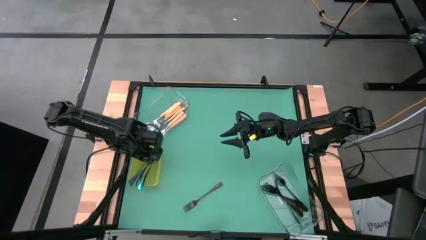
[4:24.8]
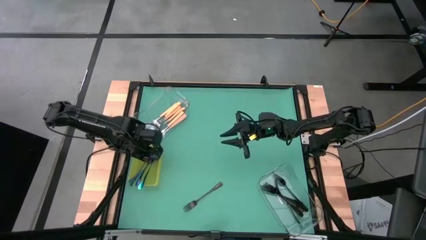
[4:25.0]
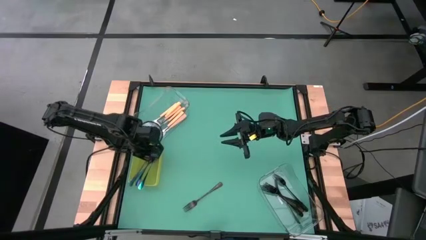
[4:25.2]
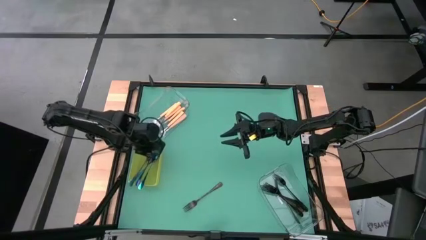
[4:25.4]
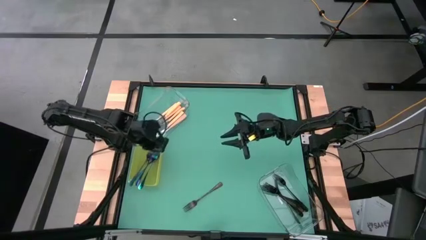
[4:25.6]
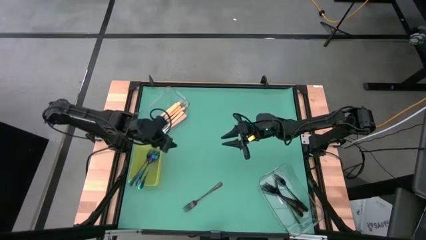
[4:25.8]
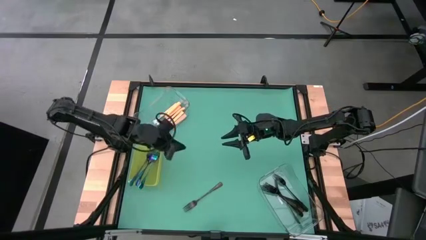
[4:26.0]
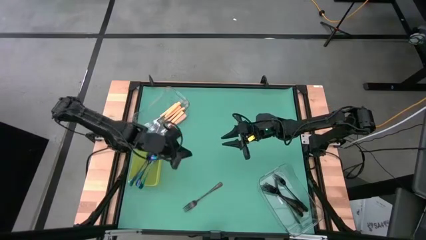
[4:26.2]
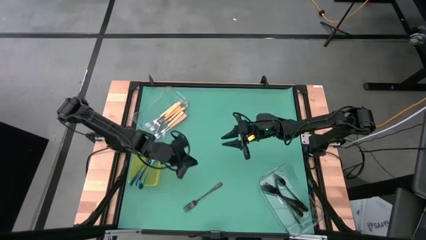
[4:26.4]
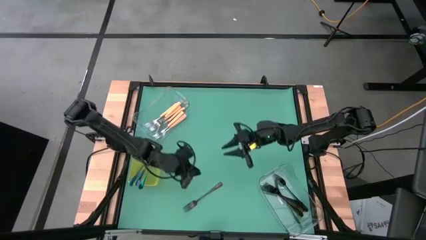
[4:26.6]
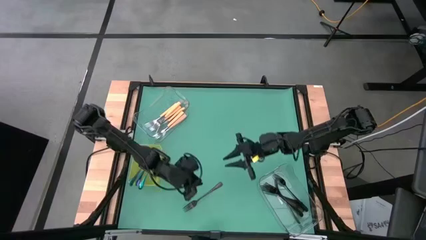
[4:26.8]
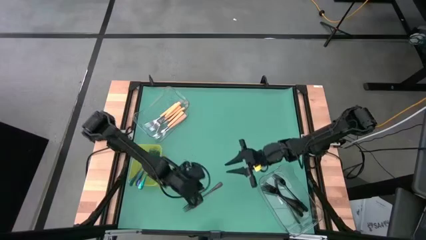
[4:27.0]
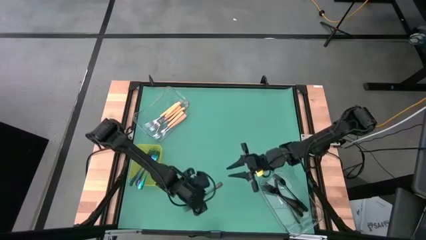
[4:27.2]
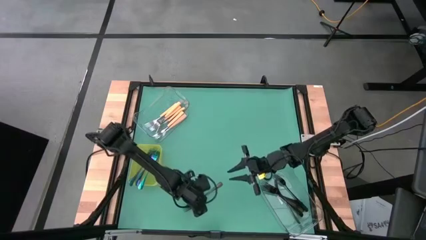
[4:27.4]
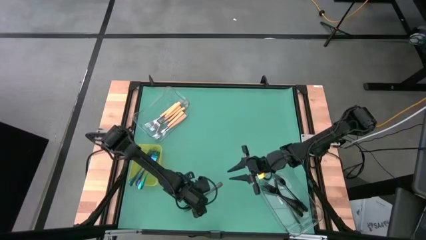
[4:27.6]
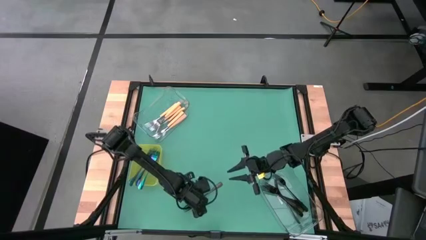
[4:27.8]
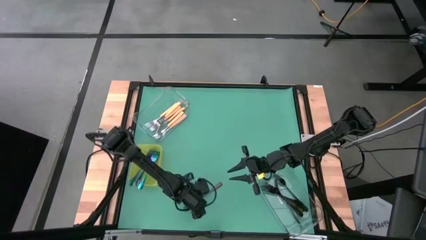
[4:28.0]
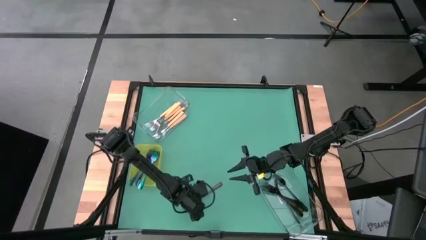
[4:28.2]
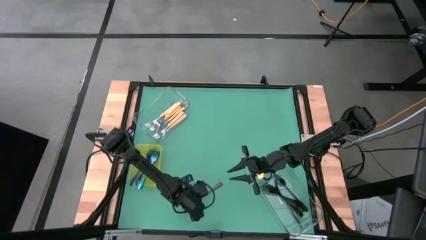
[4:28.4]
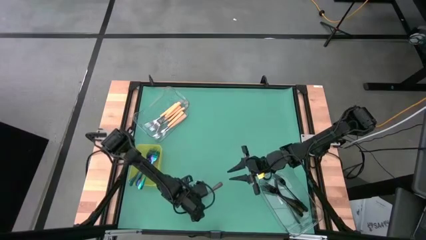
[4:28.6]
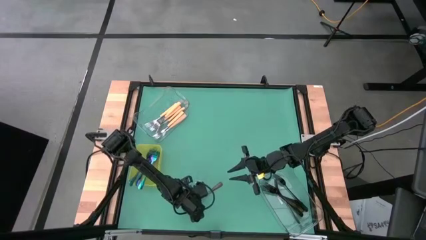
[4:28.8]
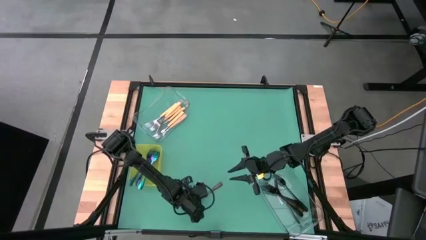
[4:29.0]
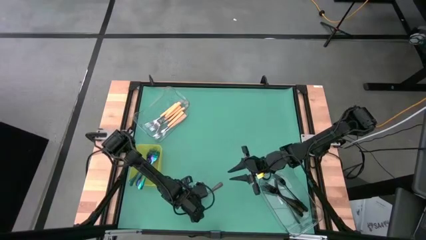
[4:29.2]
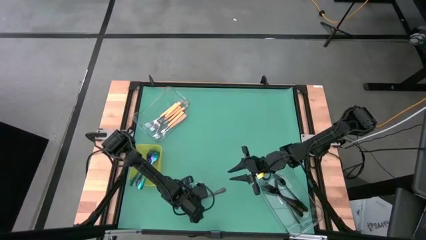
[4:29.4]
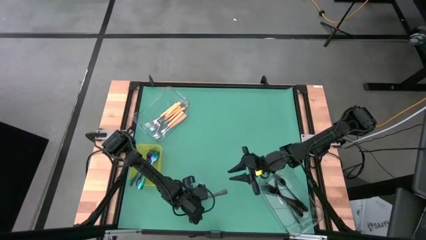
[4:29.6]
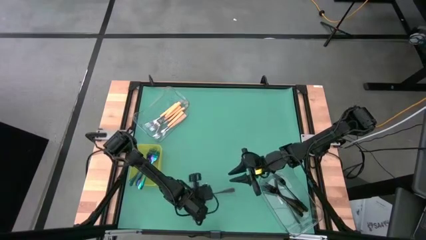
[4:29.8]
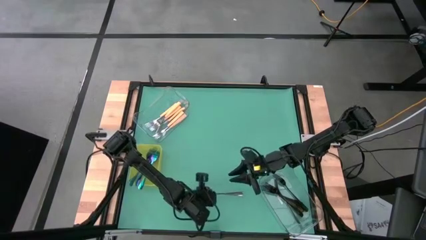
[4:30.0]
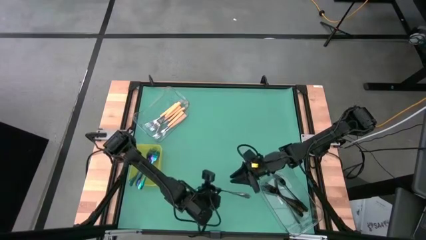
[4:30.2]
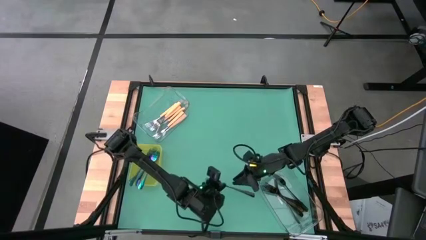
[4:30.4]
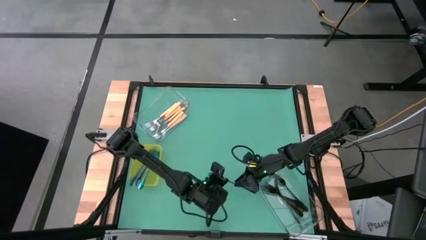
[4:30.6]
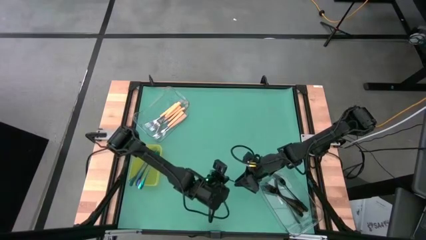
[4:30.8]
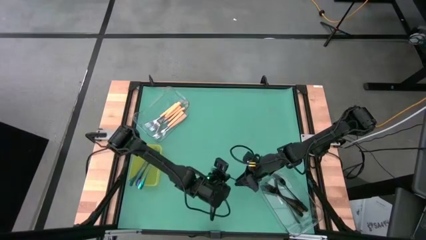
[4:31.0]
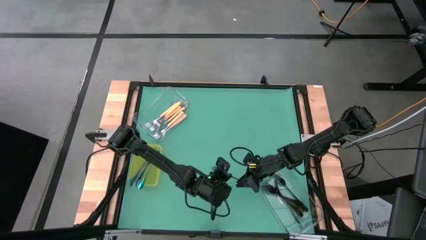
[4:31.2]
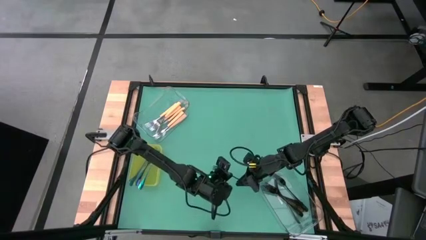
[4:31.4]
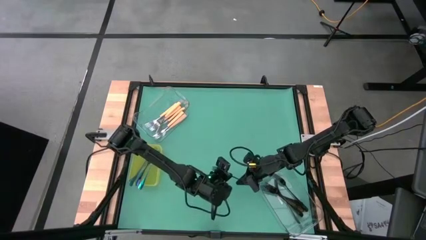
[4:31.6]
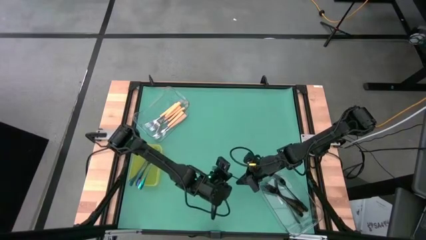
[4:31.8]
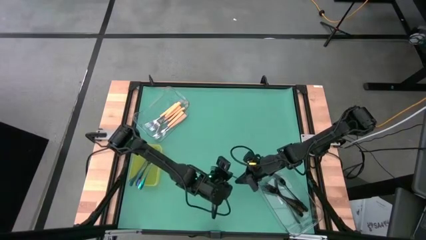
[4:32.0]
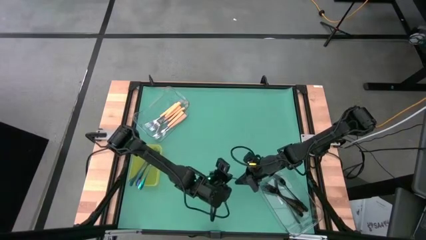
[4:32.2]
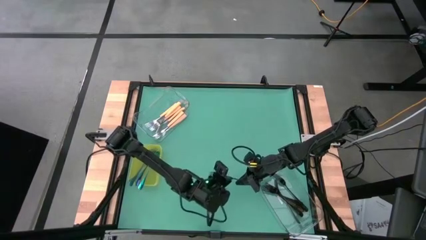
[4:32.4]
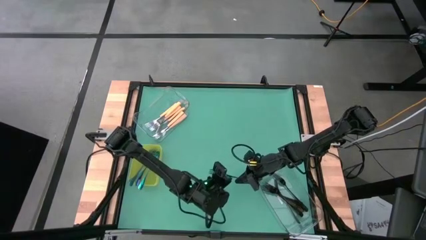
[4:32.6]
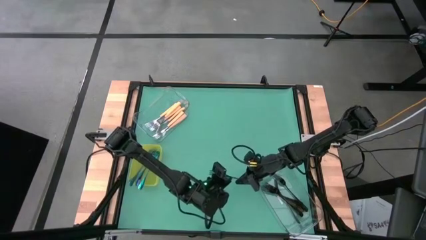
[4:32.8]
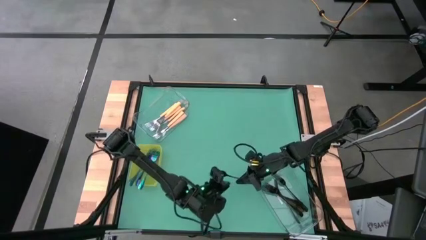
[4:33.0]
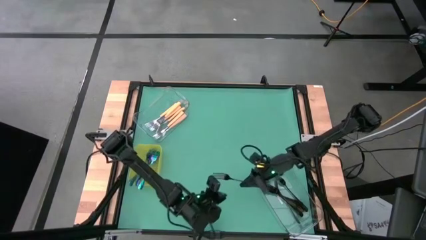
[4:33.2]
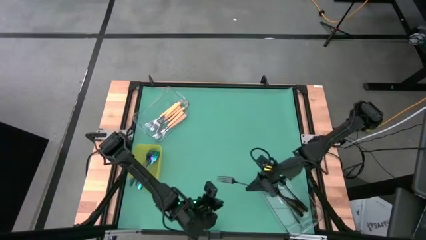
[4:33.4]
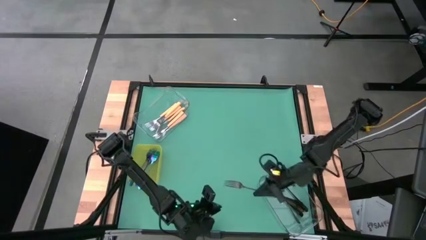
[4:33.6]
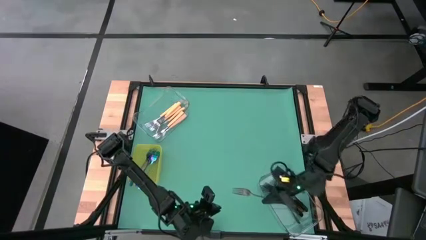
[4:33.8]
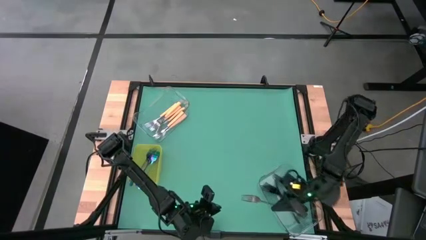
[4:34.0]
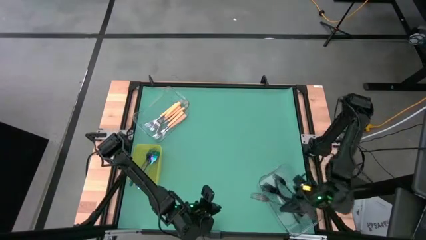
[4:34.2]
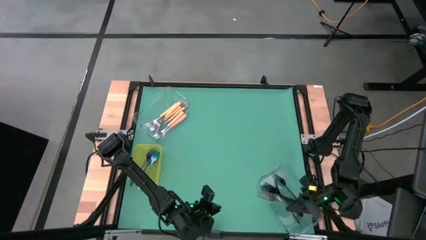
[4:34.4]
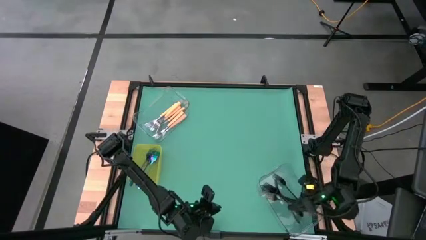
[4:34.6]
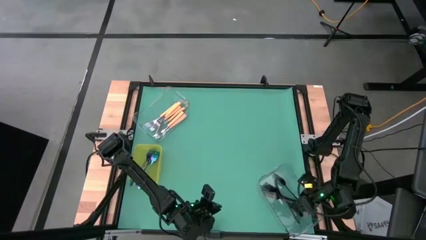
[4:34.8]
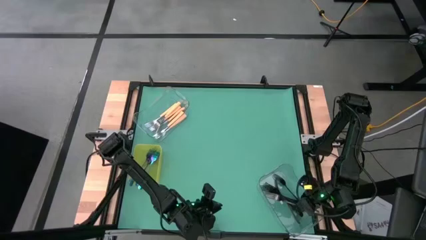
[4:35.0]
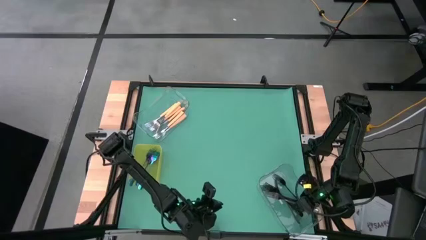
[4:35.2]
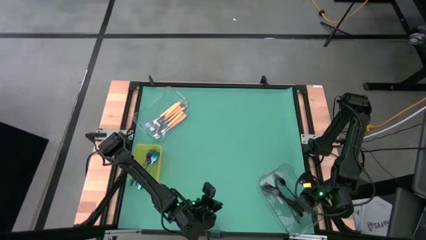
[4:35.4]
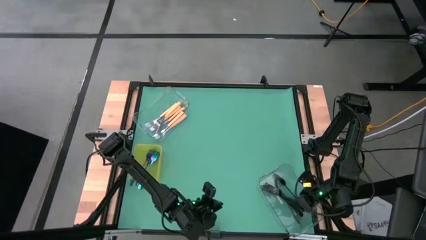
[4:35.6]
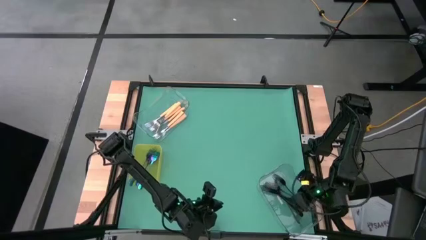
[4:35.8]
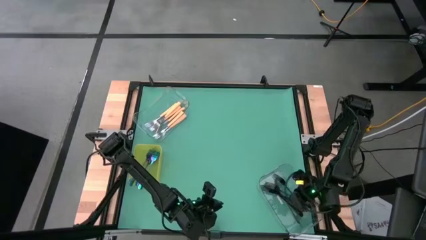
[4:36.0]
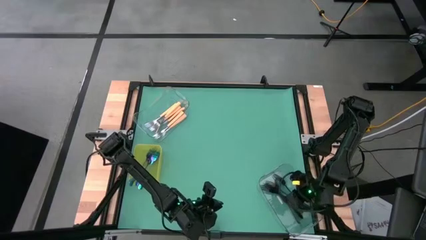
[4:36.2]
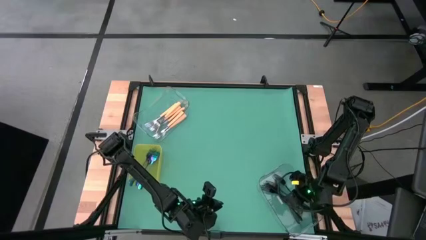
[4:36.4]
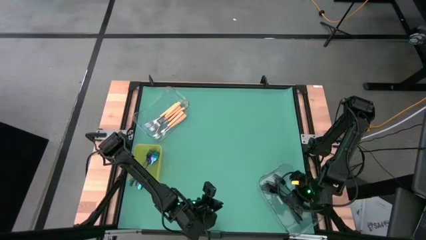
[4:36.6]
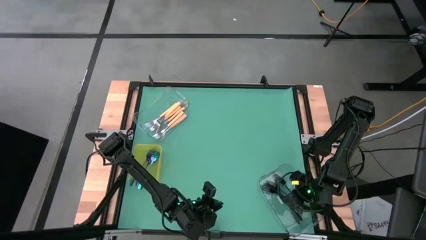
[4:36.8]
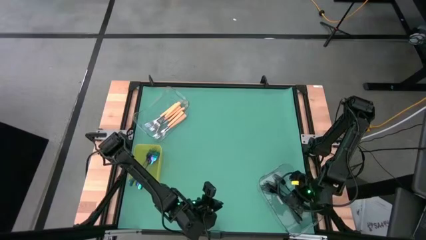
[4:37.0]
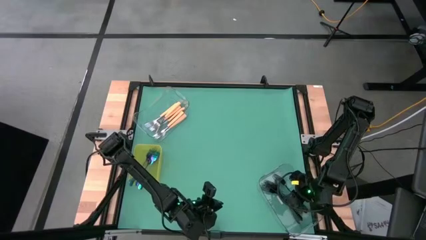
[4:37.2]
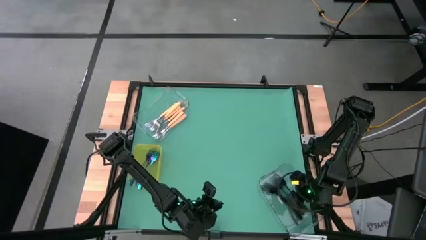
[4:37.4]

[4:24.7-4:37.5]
Task: Sort silverware by color (type)
Put the black fork in the bottom transparent bin

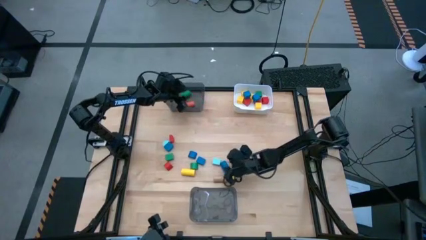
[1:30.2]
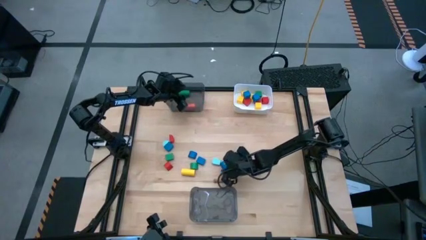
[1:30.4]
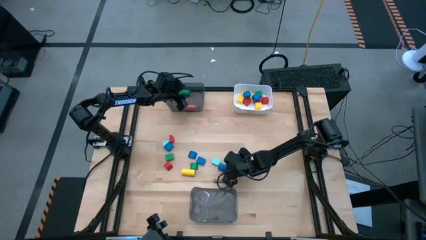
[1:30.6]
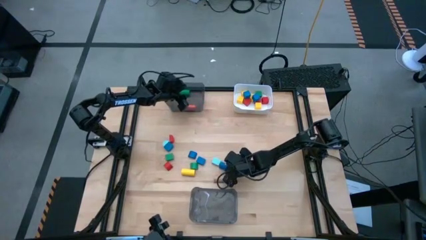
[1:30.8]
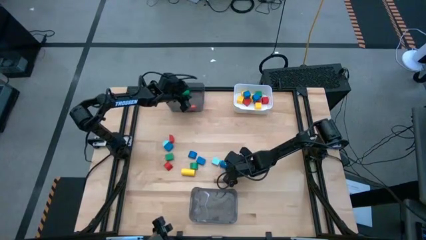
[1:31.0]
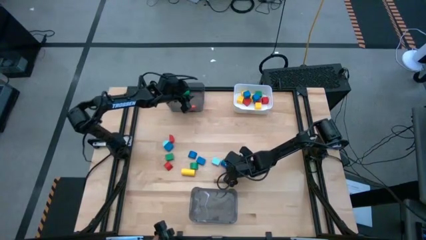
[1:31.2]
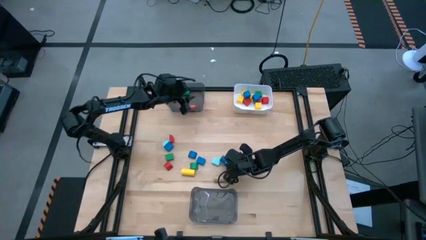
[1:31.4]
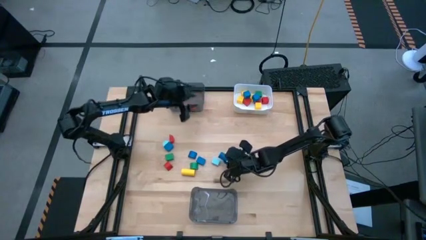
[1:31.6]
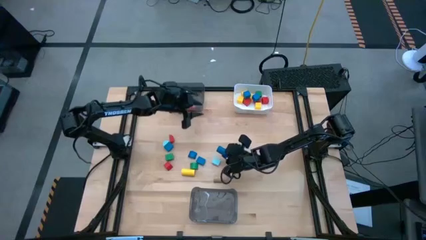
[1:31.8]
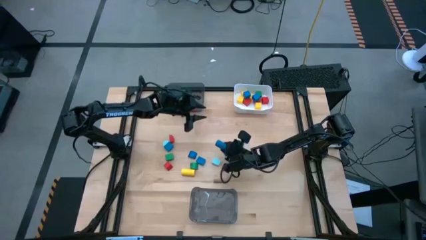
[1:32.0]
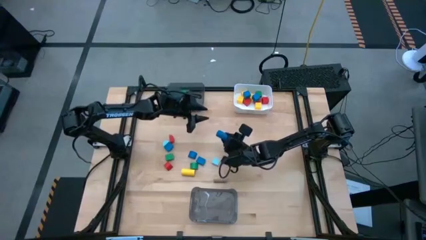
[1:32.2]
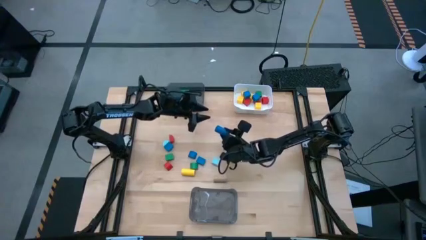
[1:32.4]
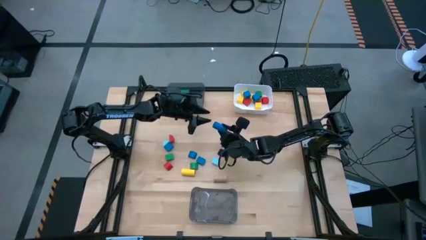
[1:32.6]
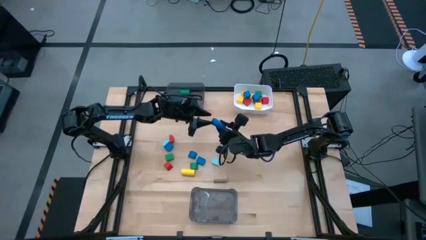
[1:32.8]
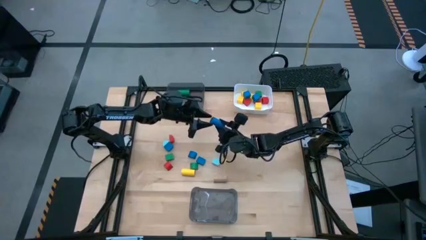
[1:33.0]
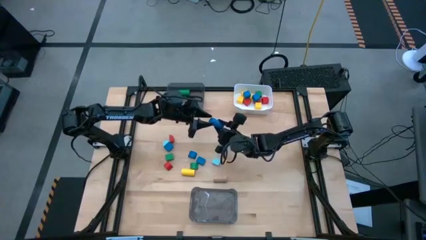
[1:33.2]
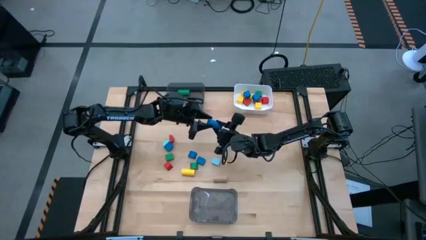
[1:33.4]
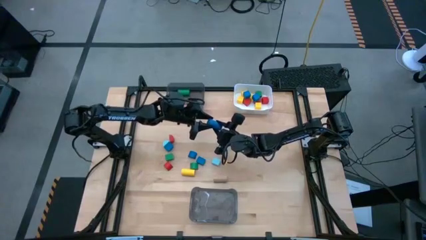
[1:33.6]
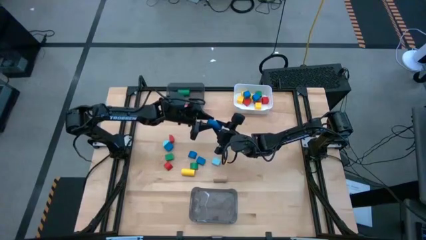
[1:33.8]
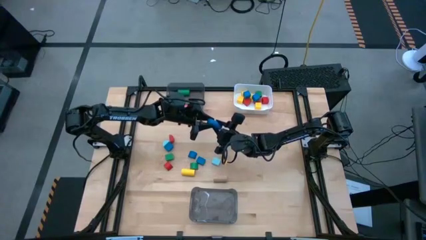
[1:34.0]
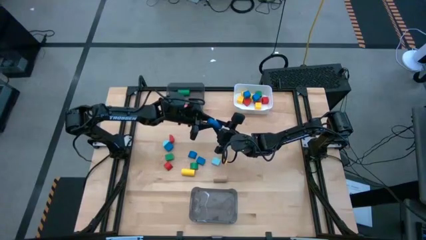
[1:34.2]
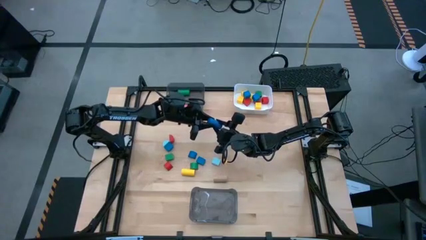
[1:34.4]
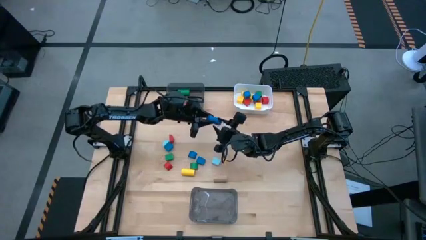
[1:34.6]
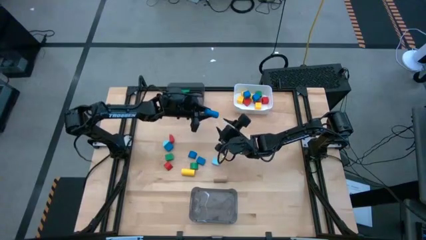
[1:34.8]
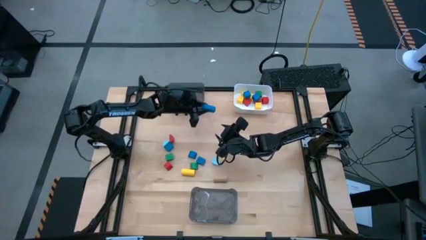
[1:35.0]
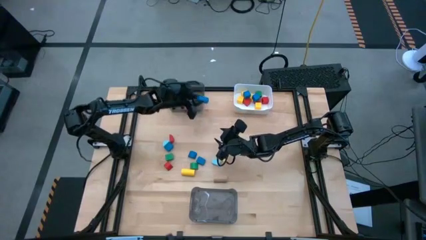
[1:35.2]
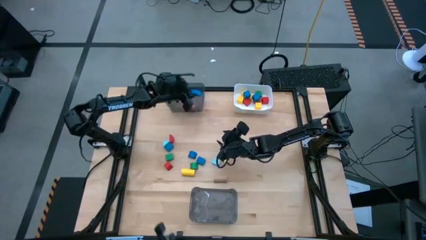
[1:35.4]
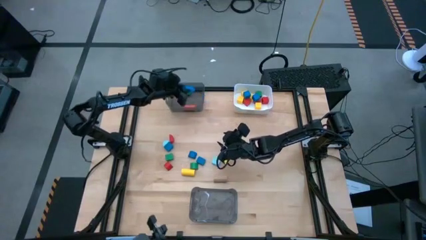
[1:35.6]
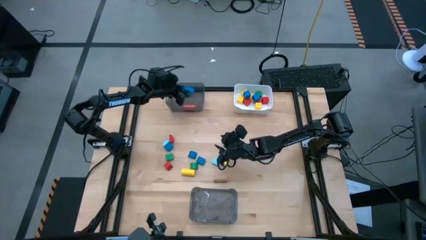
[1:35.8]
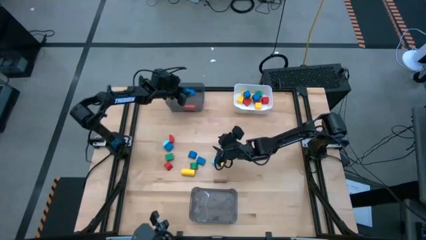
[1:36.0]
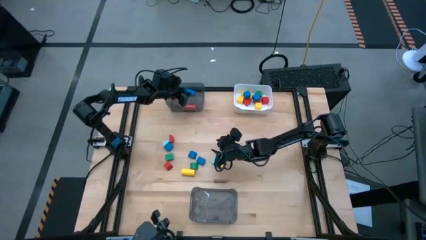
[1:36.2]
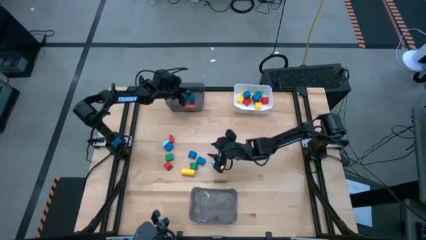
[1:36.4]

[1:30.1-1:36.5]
Task: Sort blocks by size
Put the blue cylinder block into the top black bin
